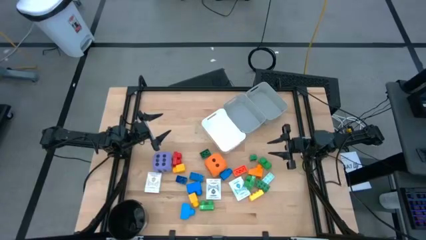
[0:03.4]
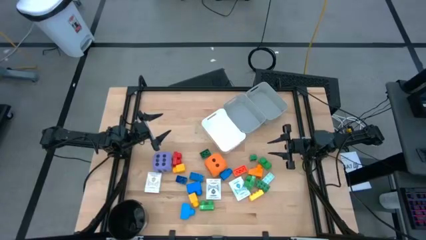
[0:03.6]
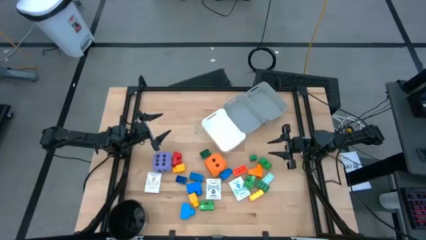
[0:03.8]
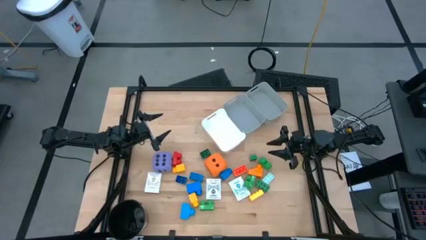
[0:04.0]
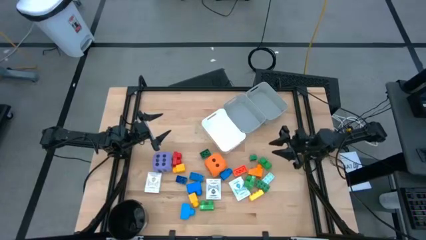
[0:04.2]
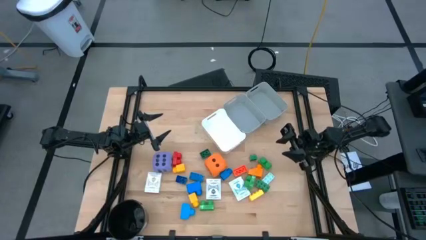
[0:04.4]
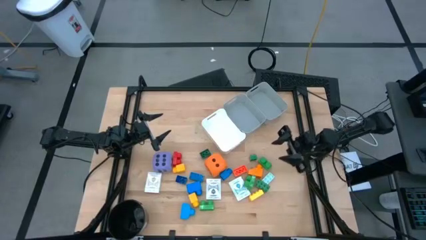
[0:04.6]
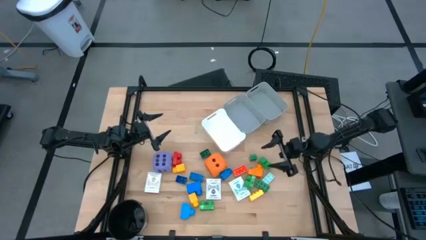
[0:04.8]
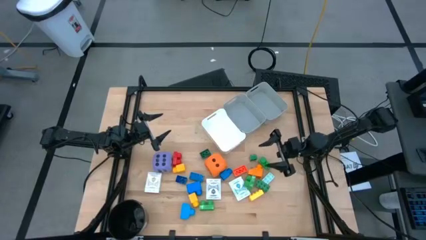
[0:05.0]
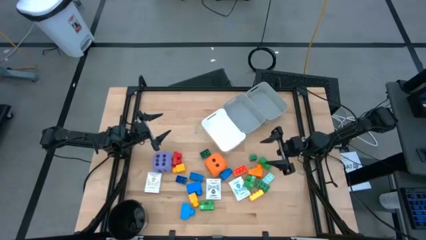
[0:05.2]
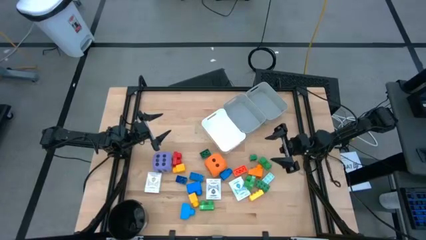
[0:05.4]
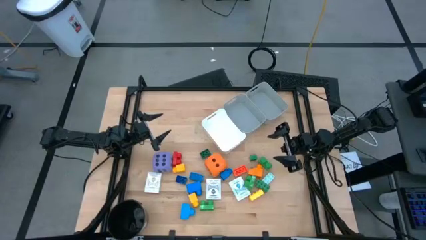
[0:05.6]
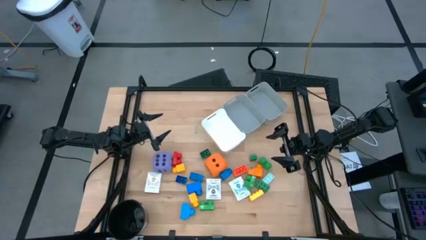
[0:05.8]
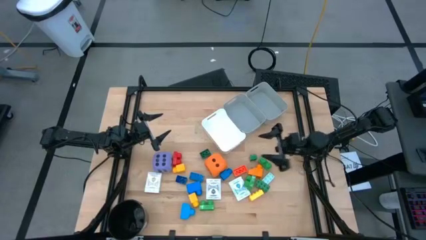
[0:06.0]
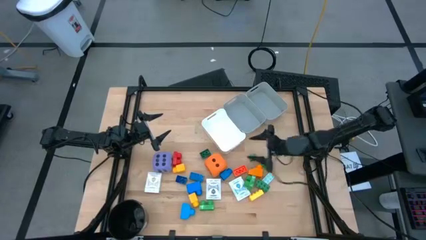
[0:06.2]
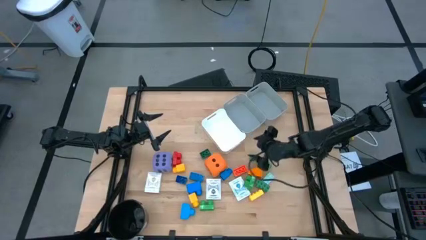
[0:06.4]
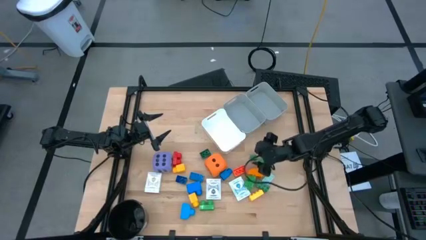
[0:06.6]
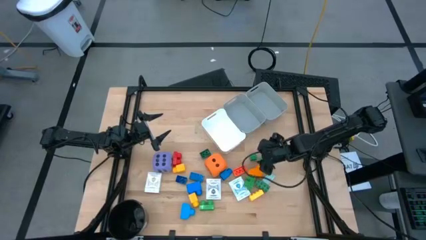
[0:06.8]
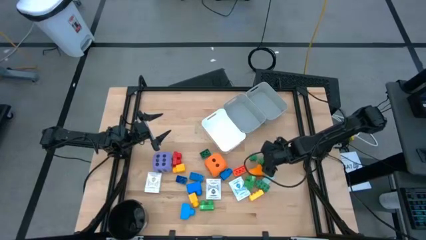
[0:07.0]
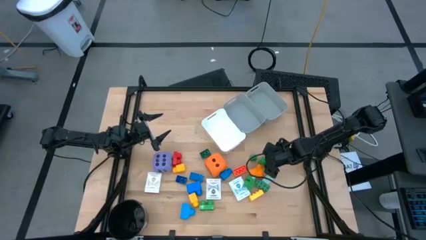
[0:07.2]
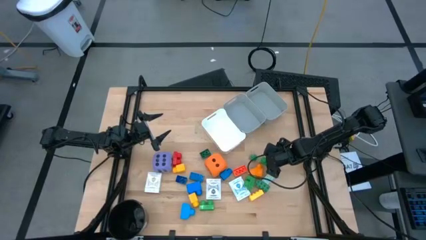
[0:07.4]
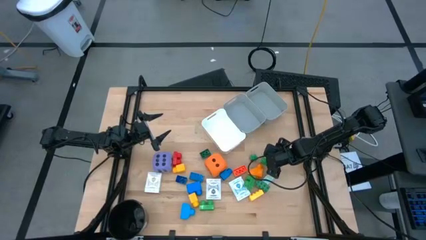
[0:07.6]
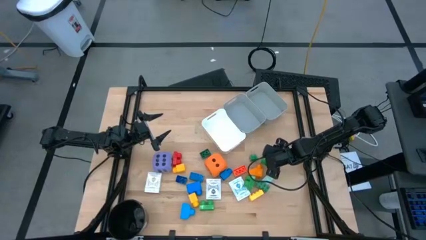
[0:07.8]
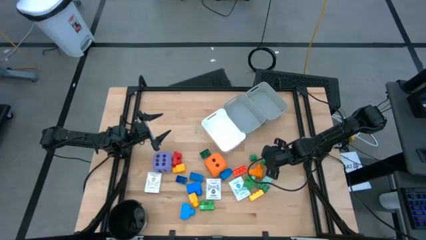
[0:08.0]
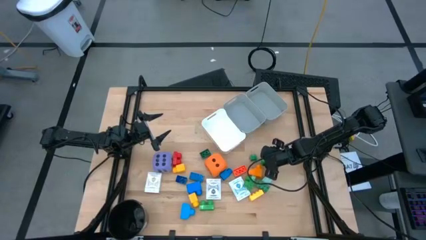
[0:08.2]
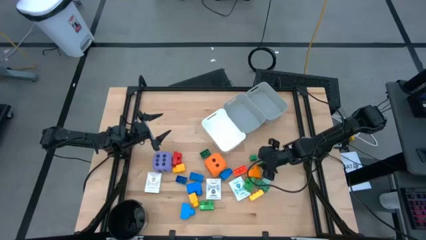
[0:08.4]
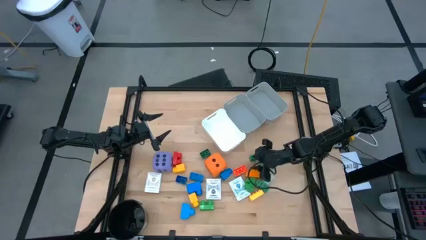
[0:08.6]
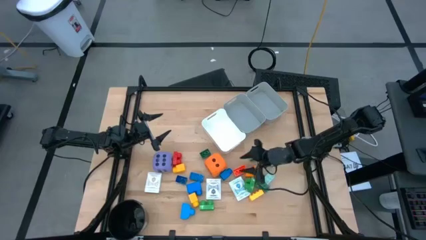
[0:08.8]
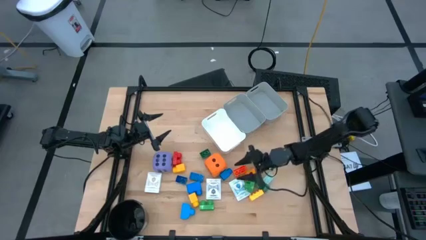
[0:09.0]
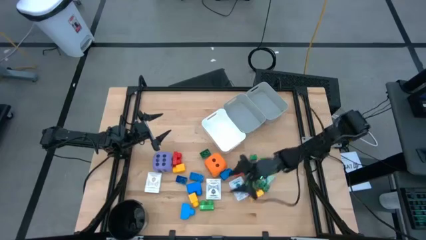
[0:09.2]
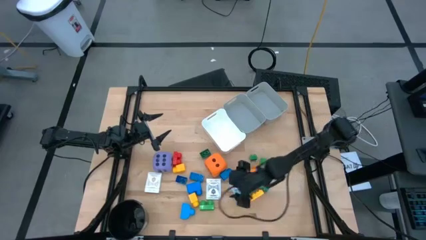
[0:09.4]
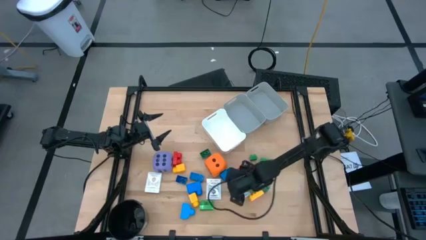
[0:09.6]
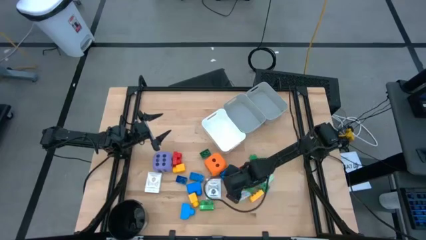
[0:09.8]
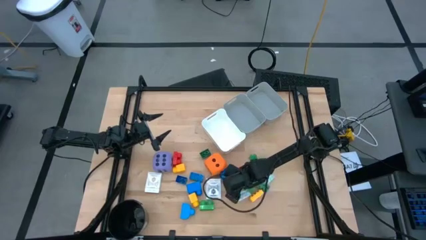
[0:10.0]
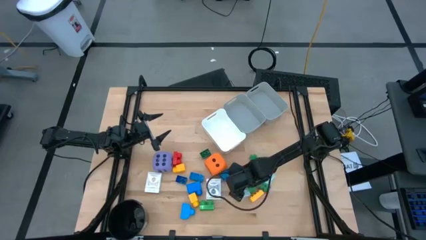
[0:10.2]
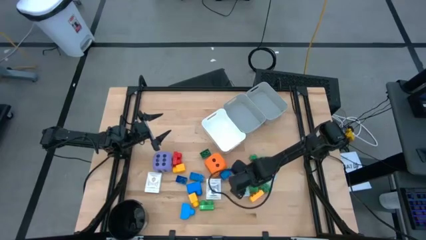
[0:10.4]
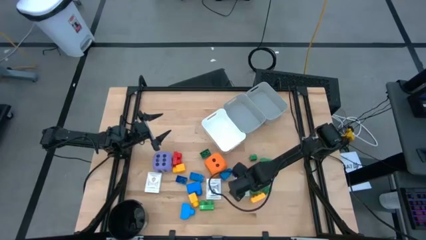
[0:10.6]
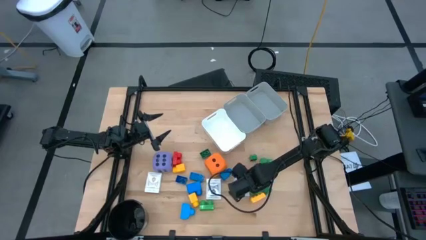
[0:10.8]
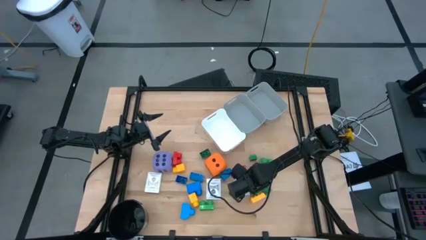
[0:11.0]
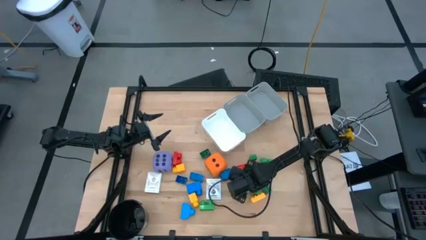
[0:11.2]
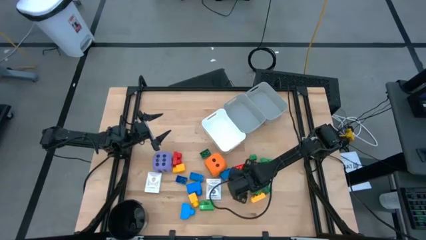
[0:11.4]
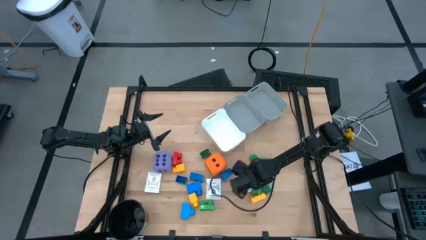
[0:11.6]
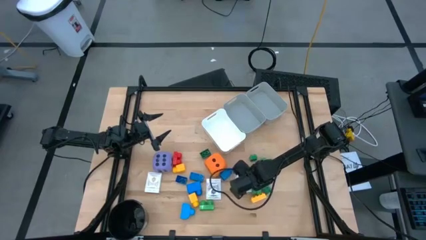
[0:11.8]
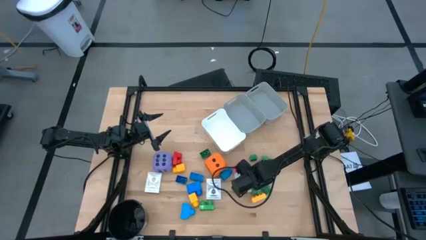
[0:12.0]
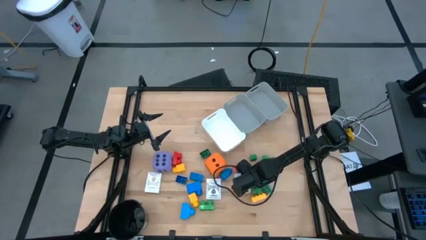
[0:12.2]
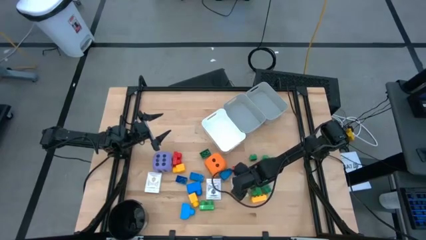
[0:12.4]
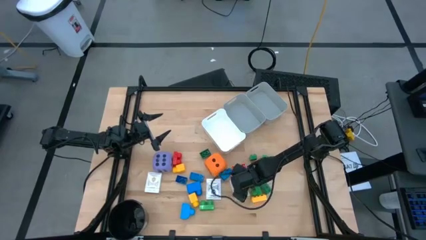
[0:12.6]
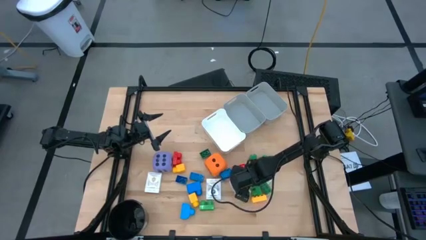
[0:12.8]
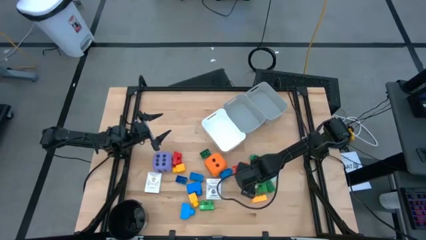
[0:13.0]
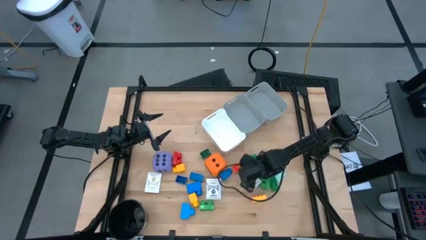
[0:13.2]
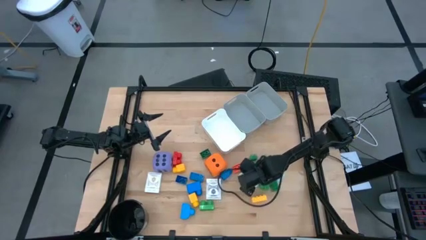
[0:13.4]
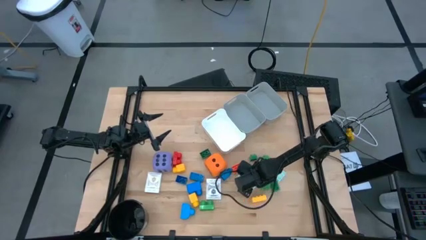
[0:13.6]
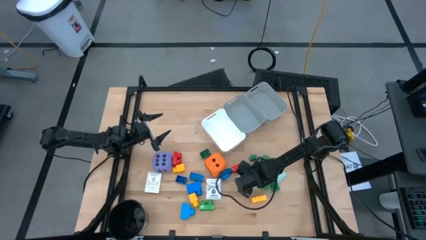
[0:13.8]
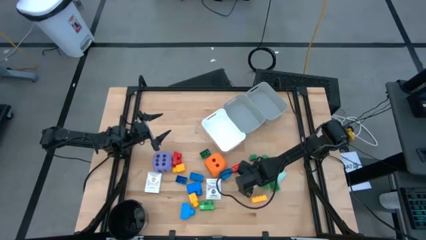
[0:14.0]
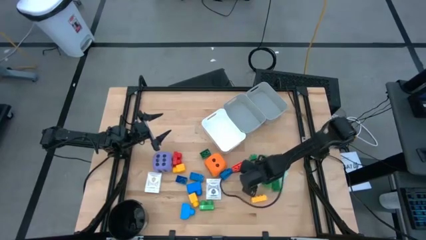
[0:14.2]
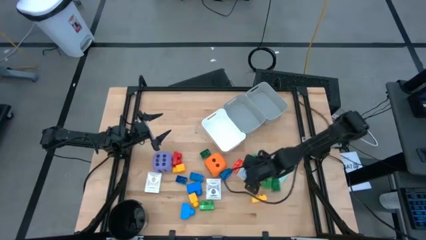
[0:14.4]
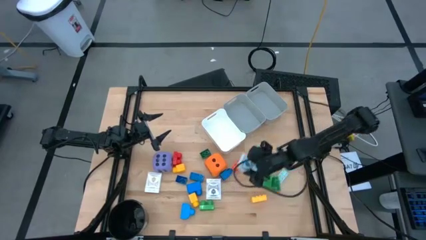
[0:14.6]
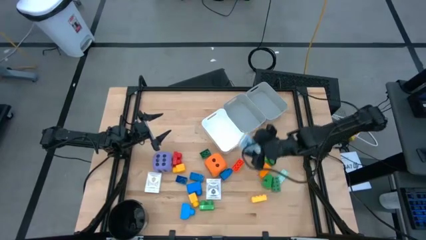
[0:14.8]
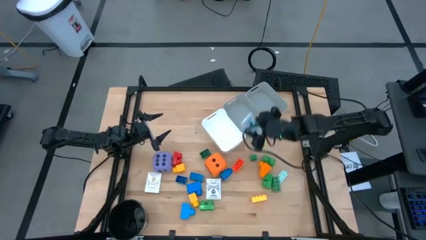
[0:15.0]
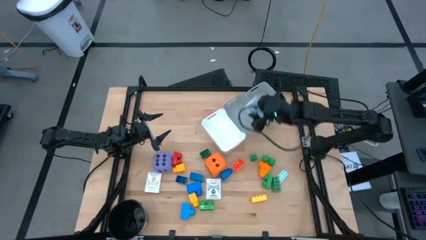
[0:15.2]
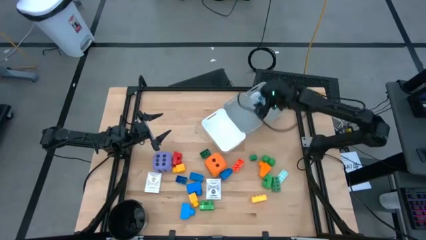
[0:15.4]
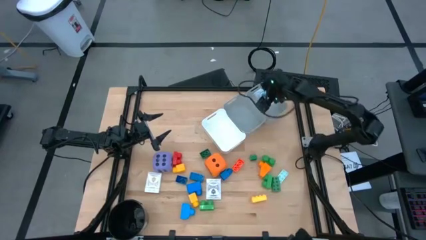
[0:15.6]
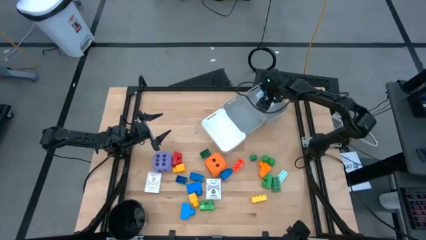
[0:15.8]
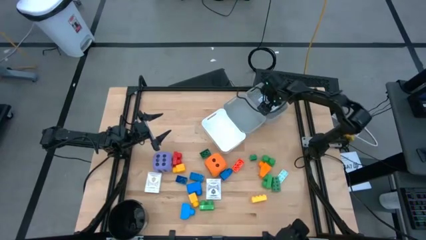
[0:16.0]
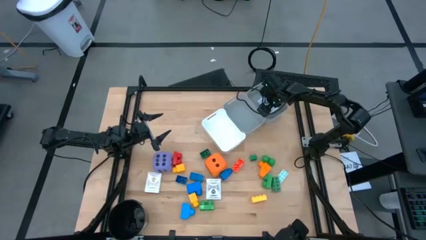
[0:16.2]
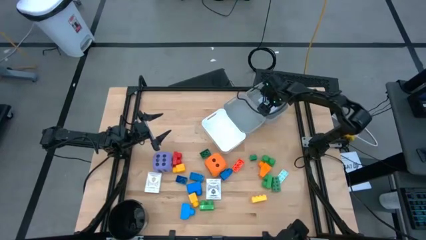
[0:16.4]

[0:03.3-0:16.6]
Task: Pick & Place Toys
Put the blue deck of cards into the right grey bin
